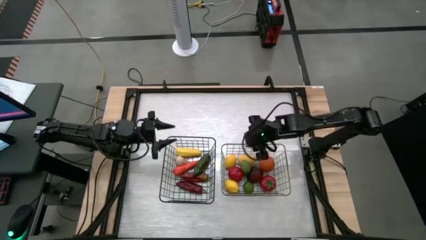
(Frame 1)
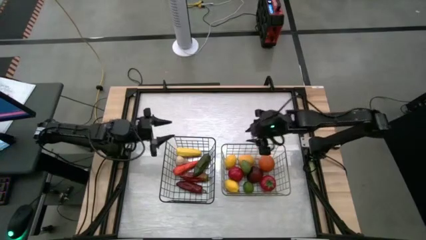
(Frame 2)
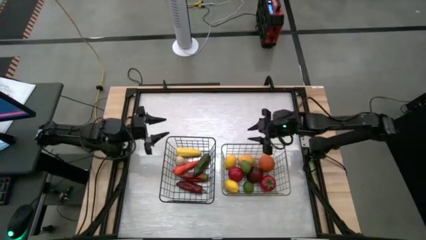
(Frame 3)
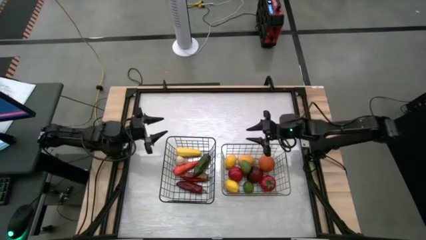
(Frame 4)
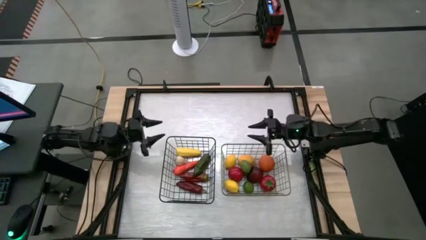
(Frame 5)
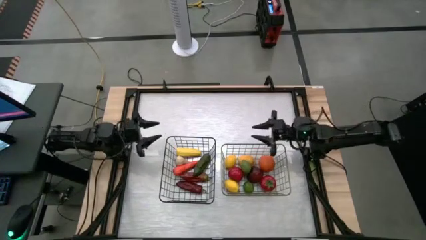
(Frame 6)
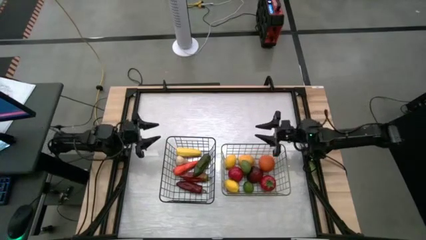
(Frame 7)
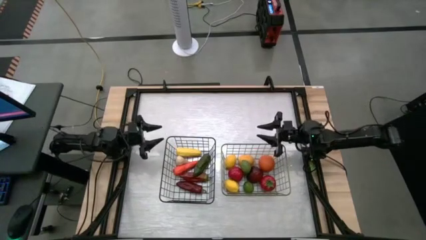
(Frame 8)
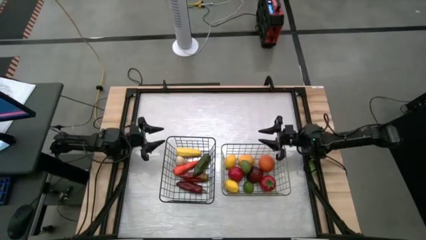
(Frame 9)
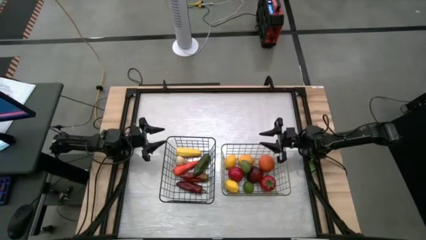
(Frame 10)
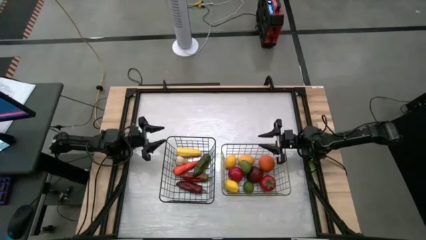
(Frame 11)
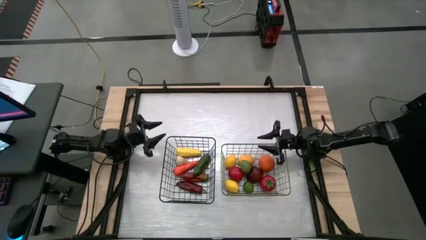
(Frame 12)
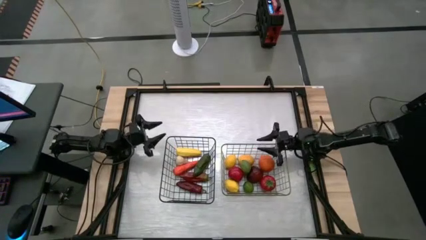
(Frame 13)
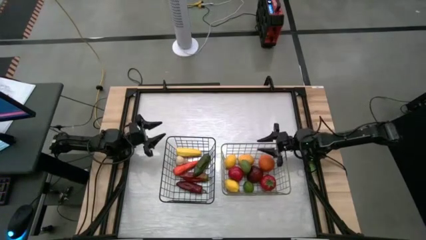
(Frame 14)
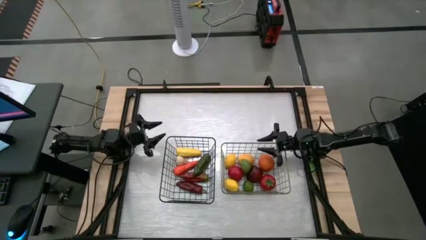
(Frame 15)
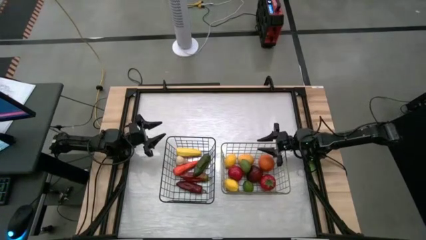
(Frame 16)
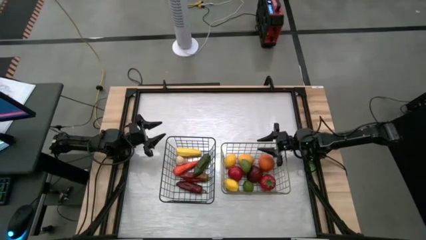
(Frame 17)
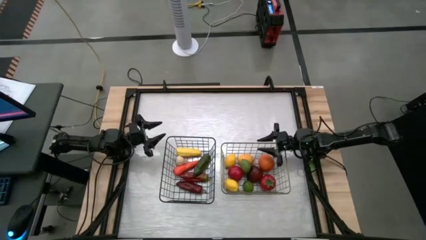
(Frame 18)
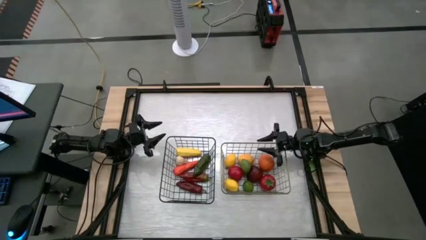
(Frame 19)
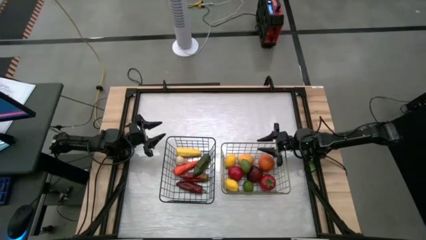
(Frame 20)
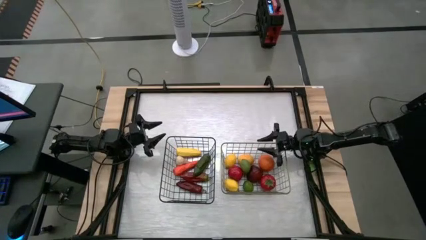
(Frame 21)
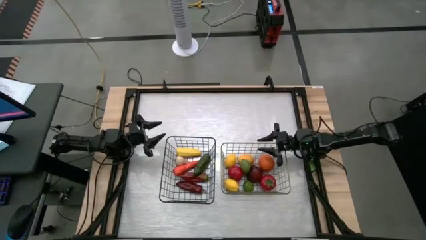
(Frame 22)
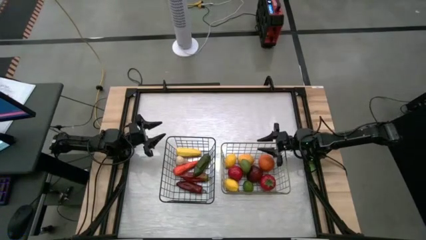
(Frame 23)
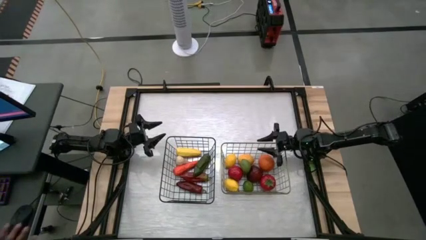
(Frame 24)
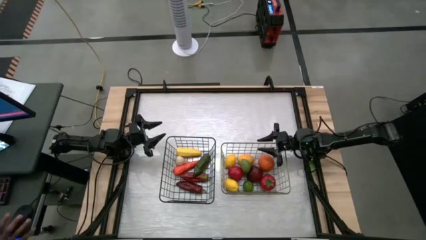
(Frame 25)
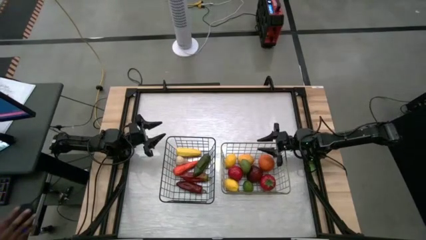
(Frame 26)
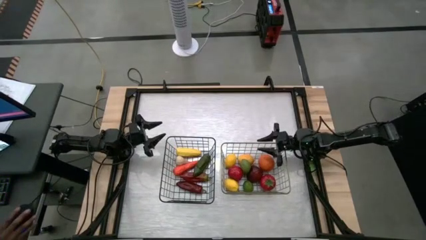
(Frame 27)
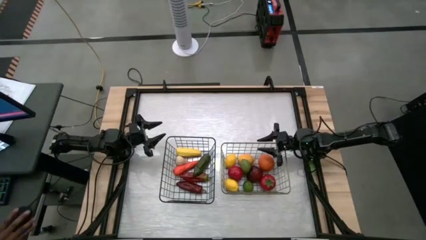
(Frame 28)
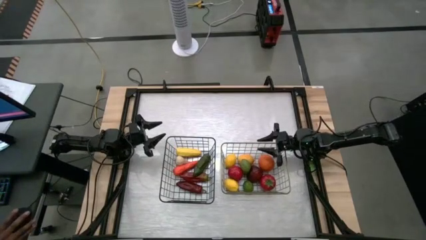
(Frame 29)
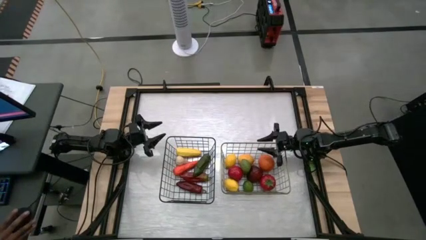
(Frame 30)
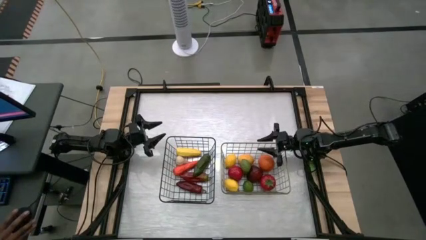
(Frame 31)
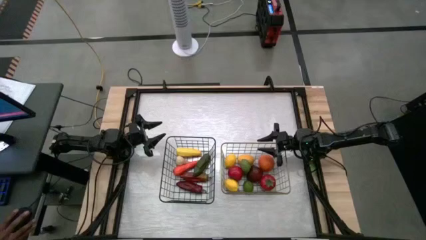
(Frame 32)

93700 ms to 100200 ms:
Task: Sort produce into baskets
Return to Home Position

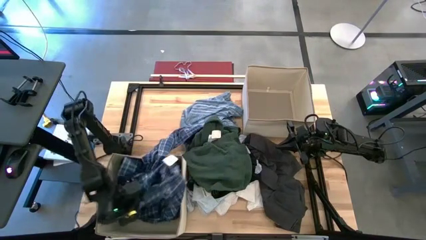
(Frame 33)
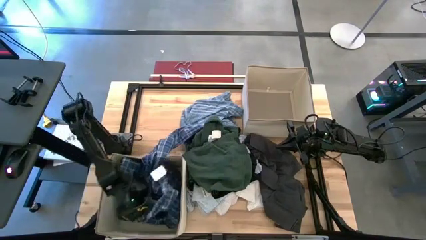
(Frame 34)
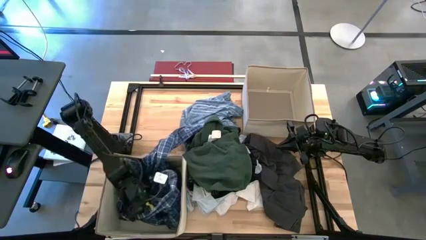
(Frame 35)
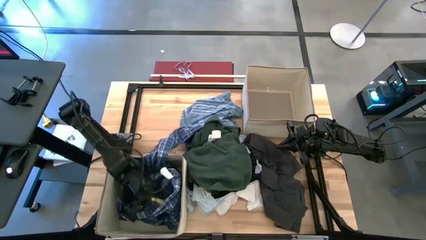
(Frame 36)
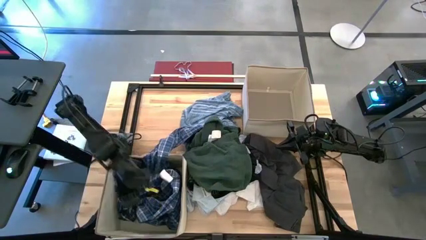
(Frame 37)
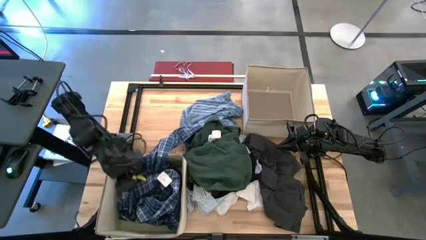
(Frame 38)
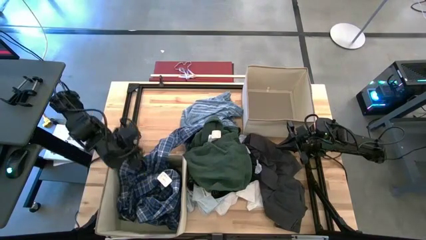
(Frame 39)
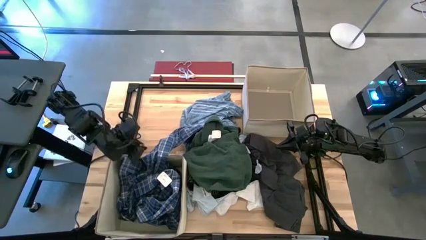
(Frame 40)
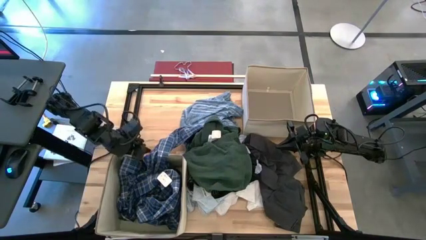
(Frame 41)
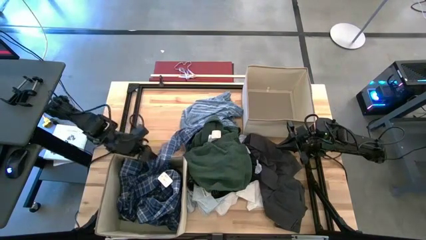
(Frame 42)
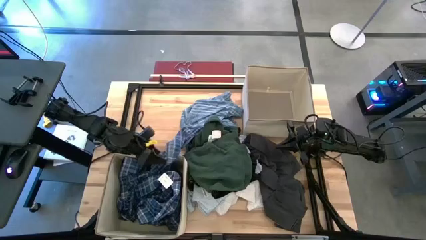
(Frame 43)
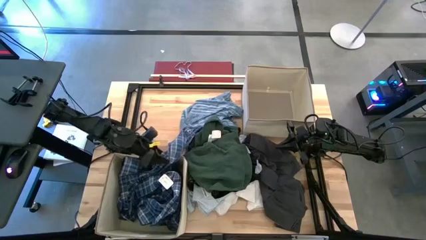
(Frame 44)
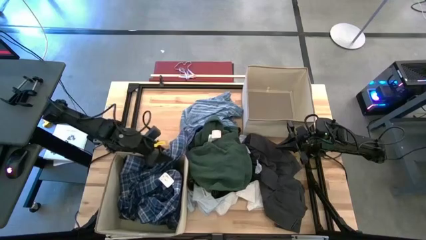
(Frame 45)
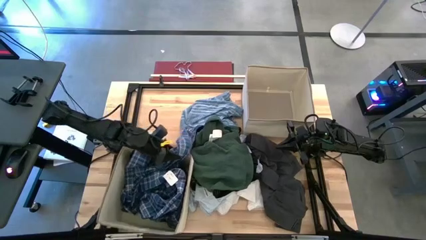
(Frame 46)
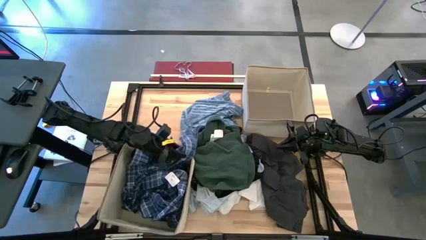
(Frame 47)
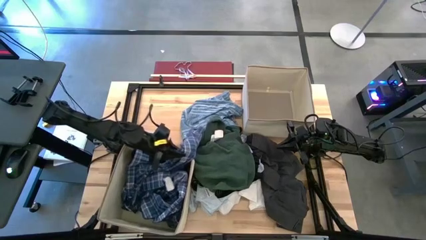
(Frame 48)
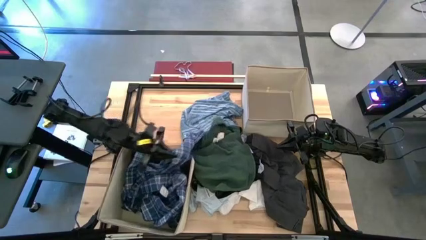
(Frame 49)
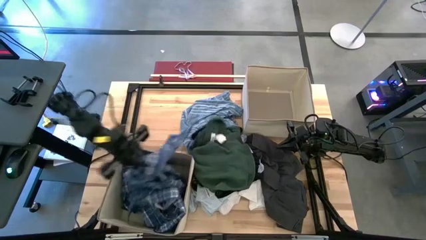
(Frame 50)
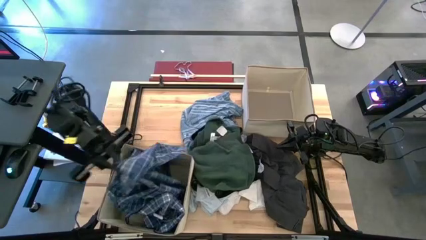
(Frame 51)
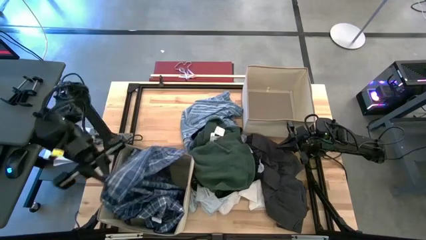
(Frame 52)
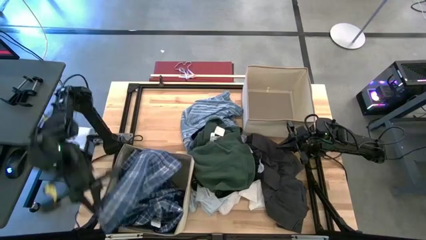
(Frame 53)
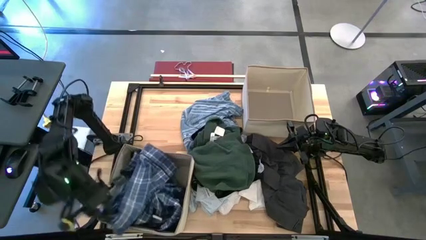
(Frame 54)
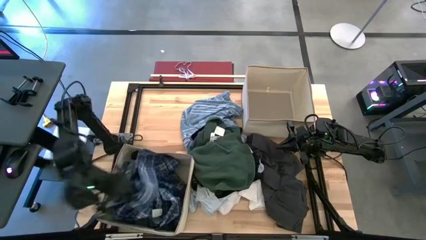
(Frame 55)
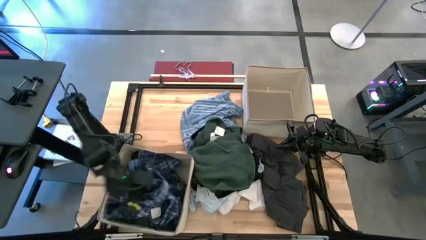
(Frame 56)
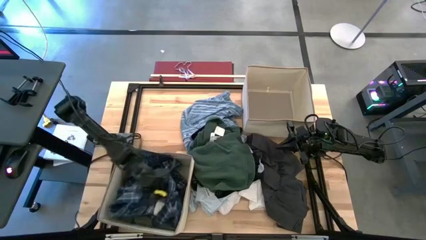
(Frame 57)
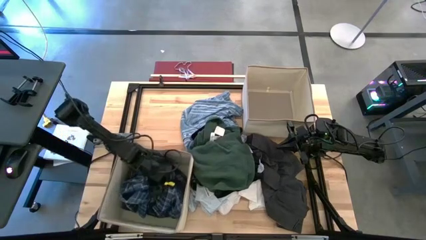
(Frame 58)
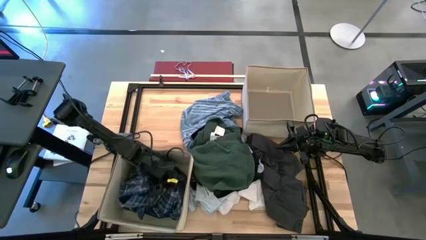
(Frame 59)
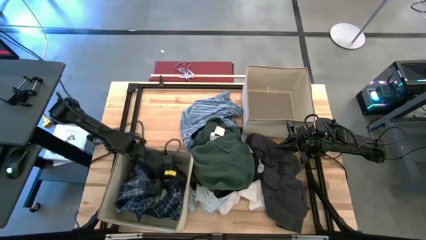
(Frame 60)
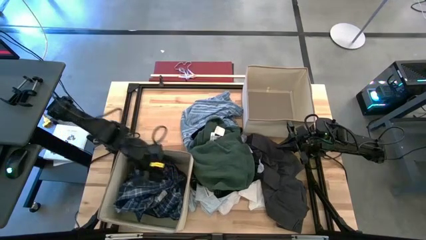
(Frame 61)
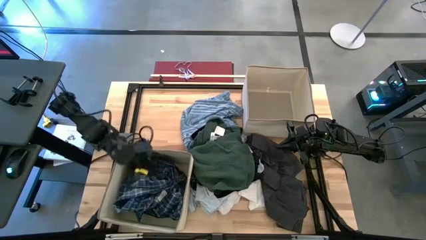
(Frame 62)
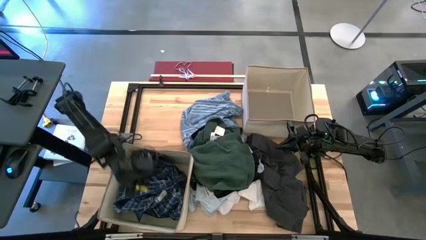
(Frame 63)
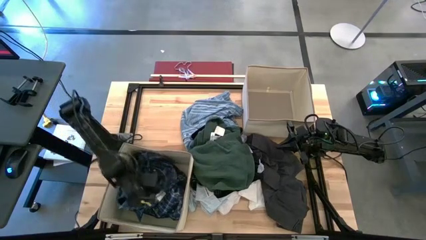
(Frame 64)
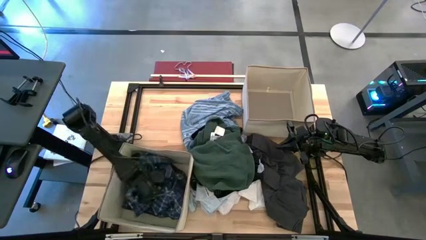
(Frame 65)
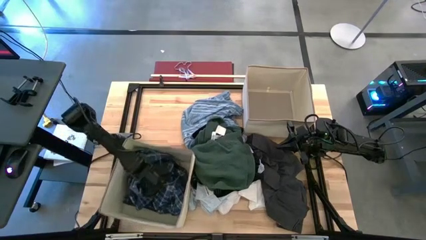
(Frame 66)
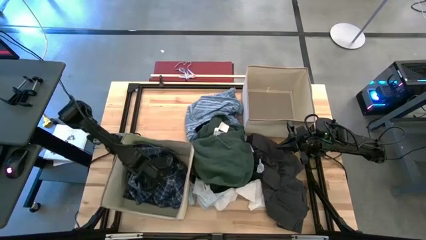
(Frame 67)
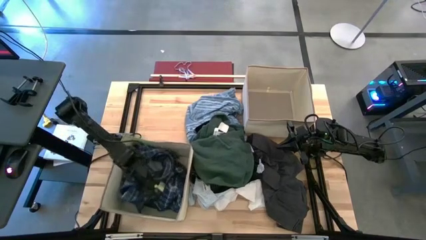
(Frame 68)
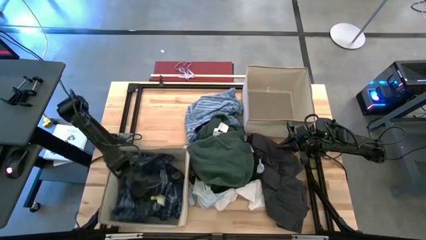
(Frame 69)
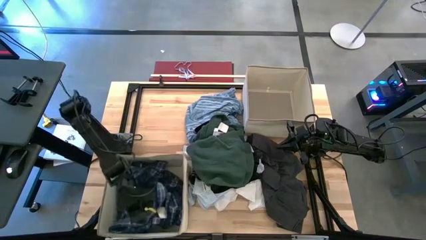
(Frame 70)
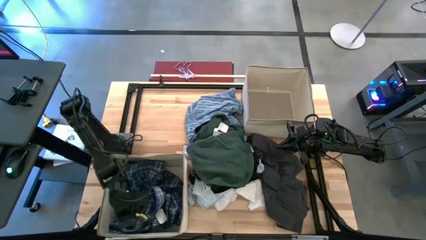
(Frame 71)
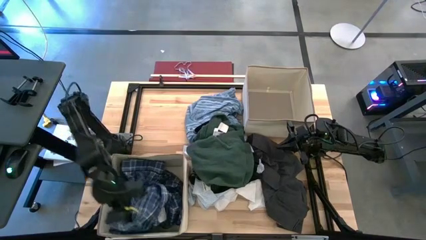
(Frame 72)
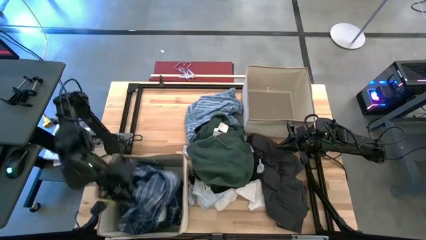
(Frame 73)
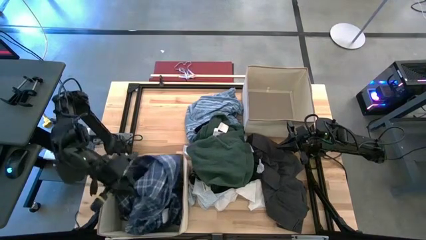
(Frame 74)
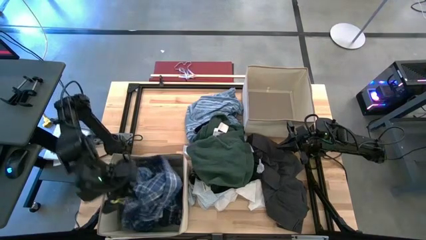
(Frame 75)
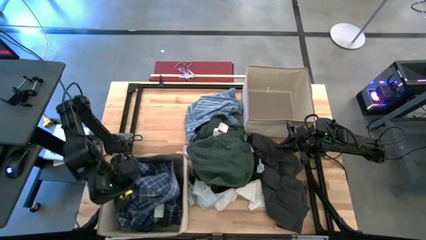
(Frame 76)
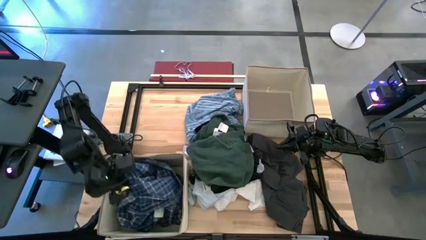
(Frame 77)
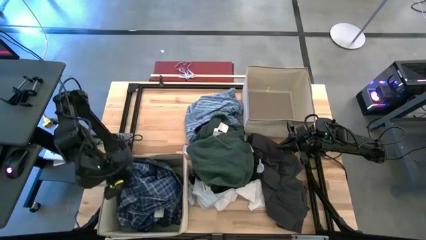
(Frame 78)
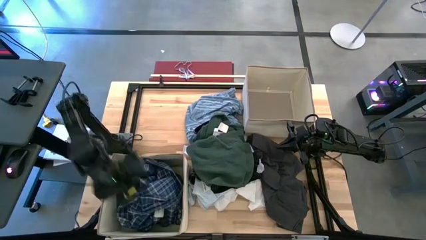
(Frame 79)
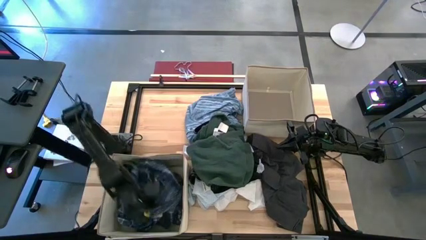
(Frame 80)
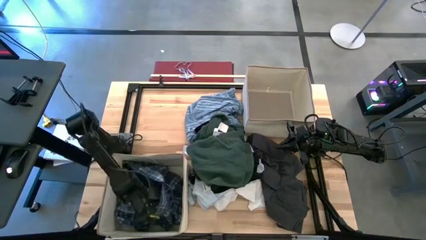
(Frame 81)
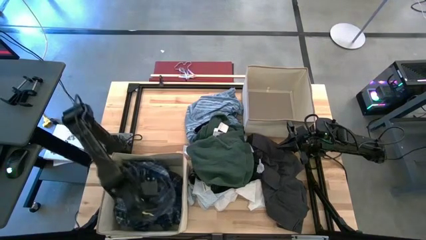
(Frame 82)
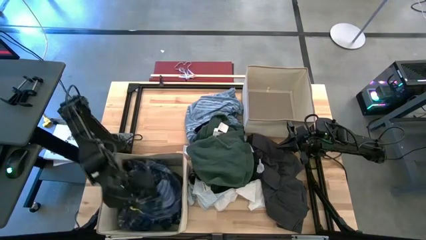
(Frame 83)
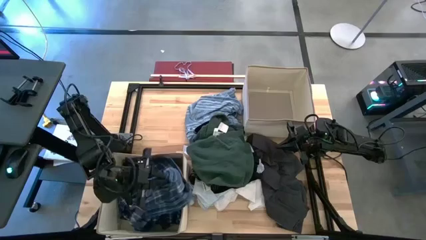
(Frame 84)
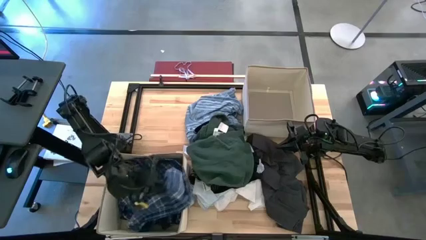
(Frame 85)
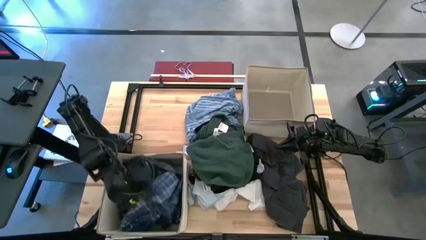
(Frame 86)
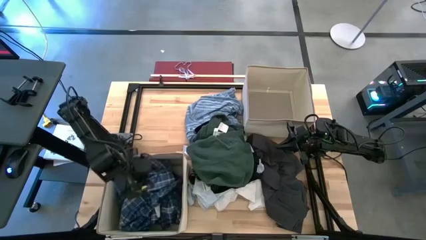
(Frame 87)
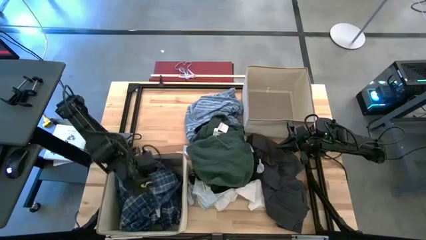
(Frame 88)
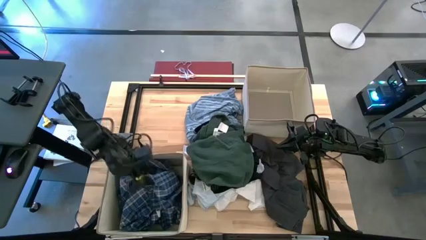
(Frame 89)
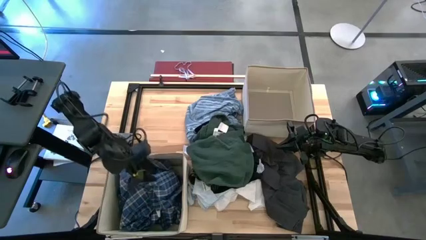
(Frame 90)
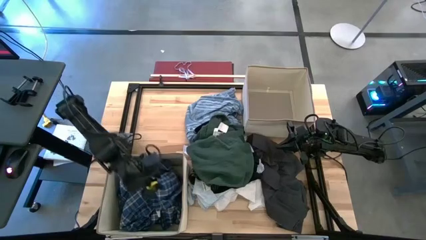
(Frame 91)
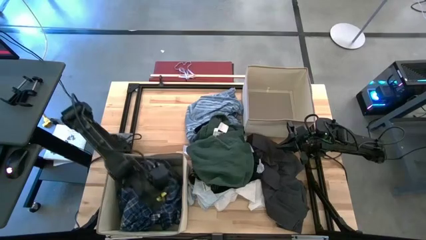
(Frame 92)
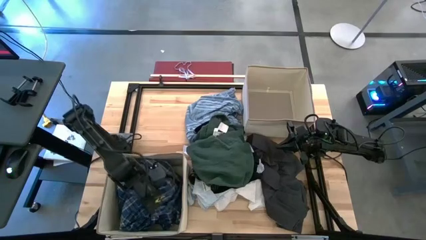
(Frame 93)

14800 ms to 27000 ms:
Task: Sort clothes
Put the blue checkered shirt into the bottom laundry organizer
